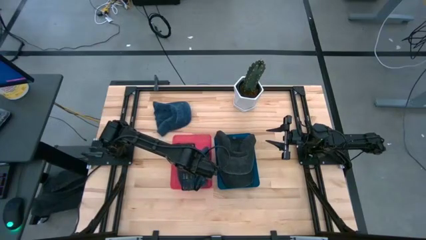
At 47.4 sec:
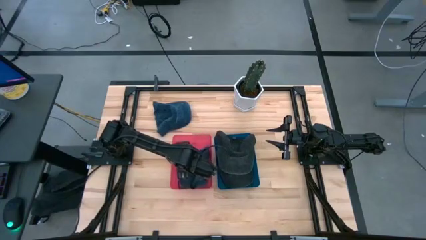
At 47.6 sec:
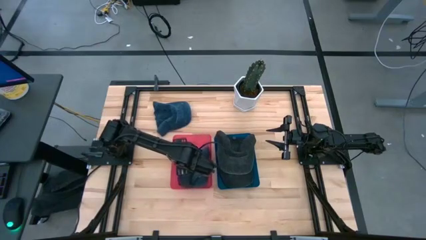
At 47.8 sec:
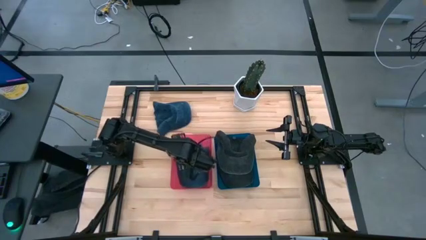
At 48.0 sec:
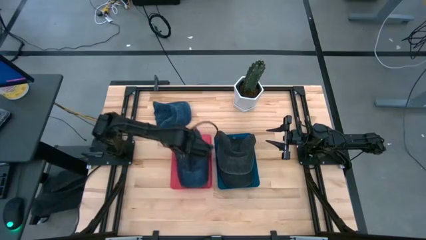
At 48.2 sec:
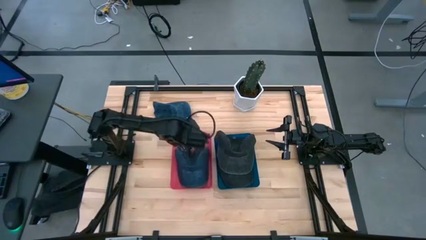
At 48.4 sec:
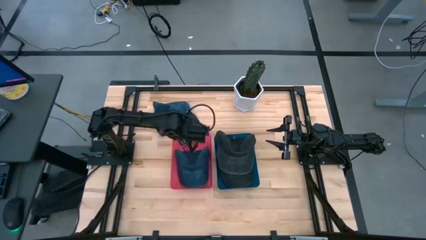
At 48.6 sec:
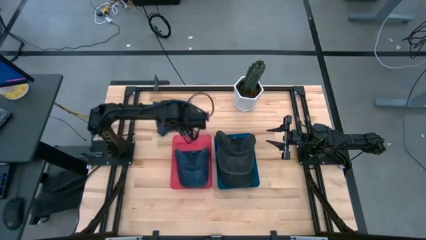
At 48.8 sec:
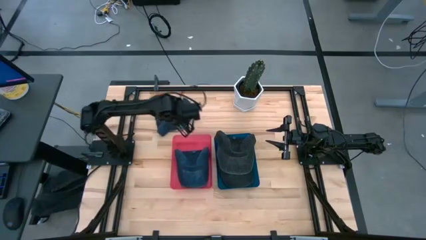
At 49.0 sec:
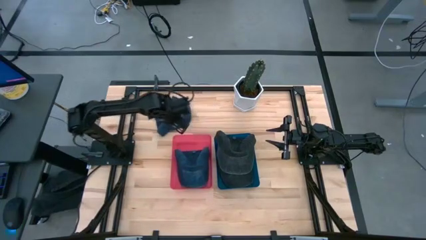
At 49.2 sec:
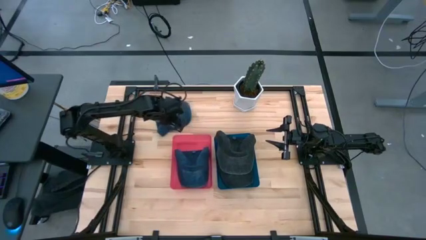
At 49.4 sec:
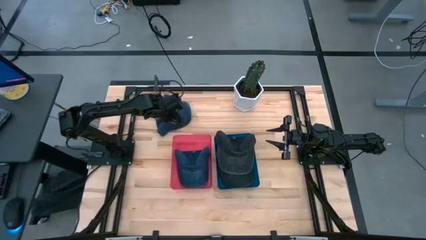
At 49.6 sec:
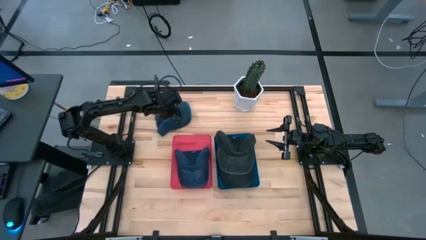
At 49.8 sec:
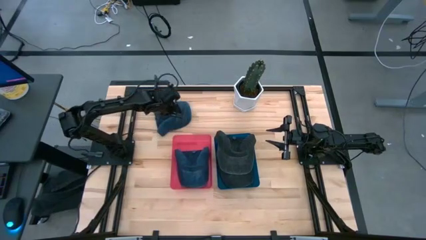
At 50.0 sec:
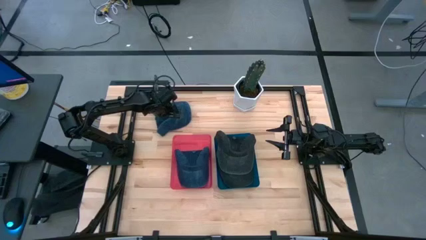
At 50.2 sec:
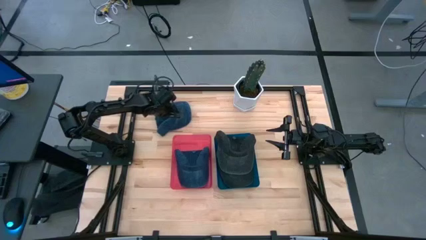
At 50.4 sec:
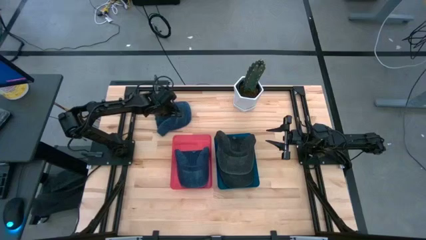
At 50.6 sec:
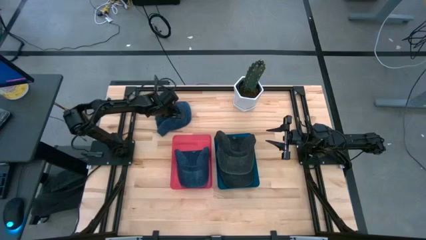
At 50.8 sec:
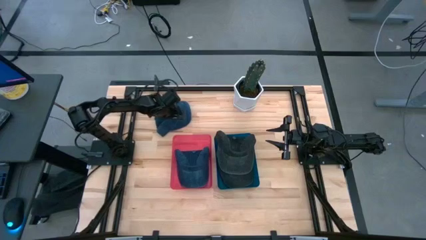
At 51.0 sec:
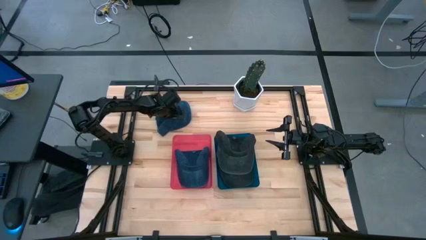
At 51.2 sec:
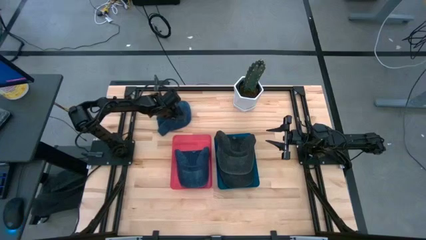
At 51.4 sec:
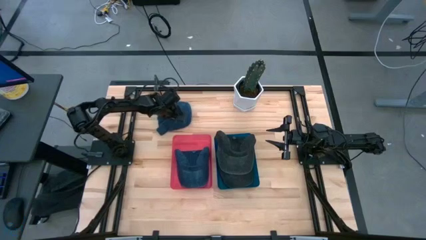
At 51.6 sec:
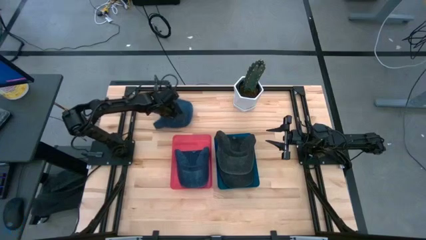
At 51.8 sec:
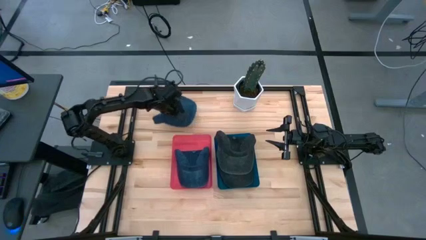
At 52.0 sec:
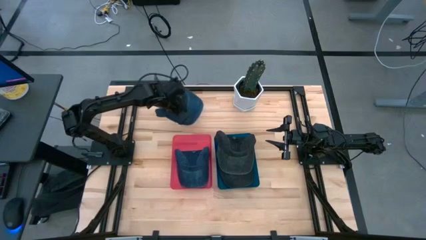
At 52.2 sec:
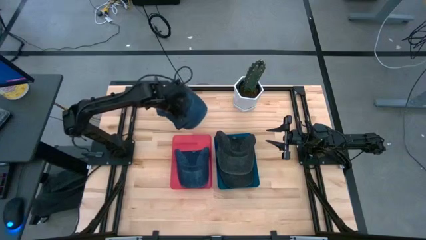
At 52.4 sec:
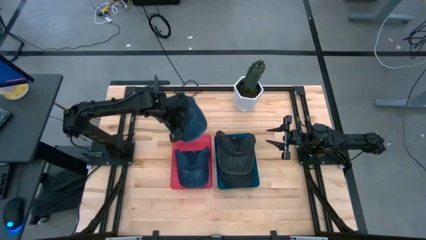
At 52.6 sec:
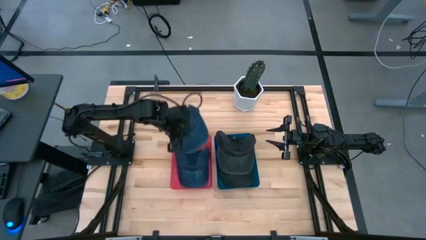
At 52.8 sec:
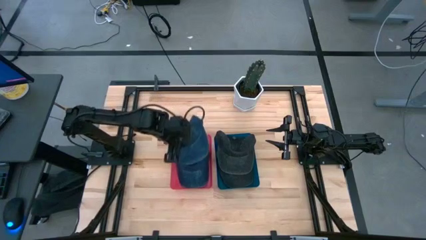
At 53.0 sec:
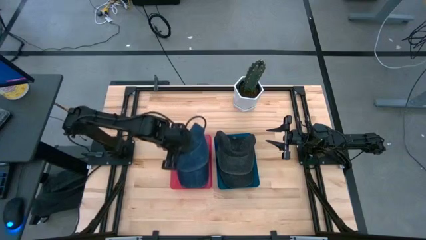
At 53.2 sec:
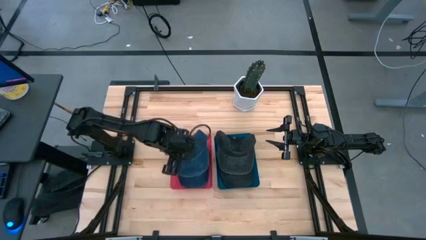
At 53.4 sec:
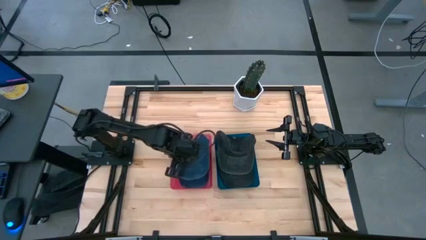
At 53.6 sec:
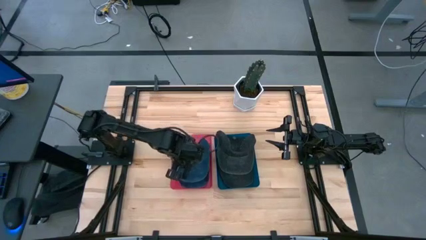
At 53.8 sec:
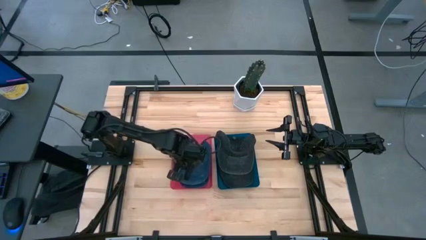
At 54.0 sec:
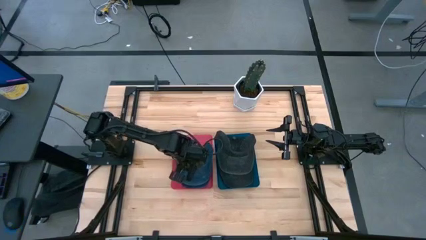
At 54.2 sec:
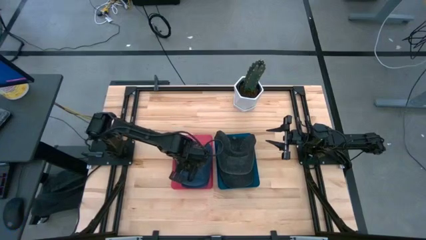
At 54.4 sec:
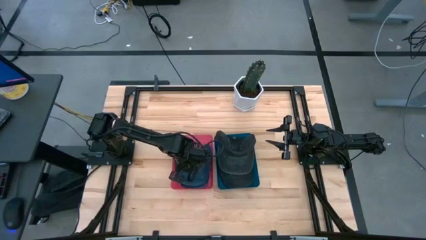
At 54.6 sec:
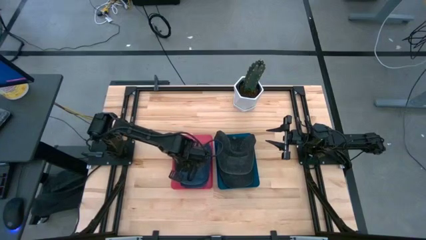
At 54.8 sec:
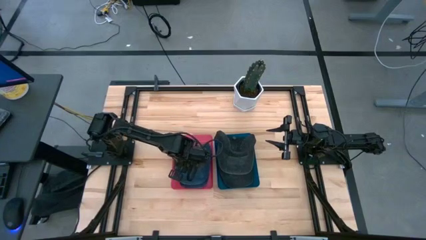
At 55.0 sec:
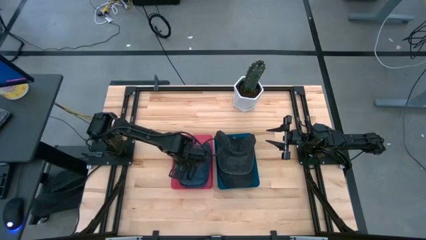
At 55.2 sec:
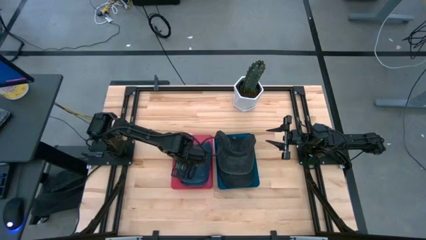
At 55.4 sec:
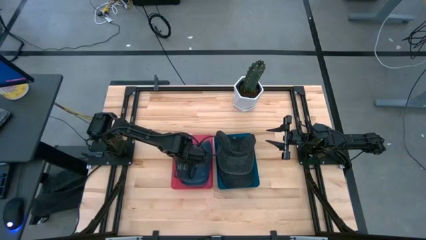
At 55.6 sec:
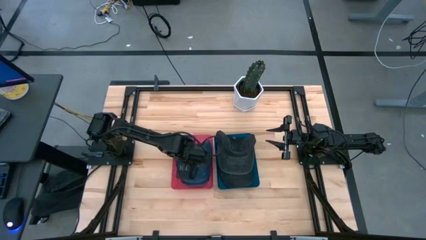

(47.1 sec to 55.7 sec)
Task: Pick & Place hat
Put the blue cap into the red bin

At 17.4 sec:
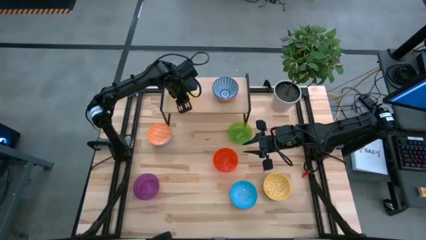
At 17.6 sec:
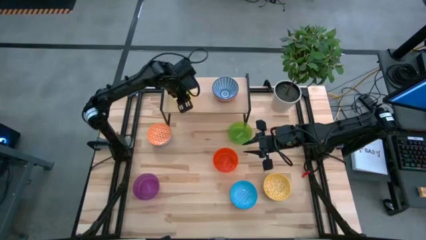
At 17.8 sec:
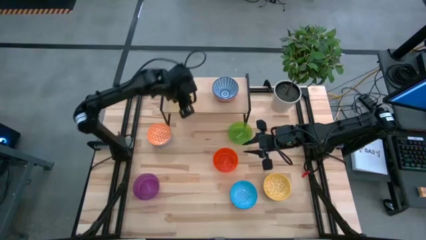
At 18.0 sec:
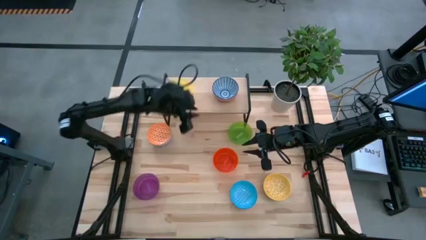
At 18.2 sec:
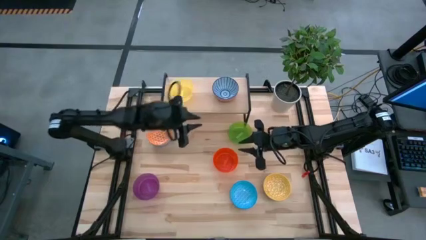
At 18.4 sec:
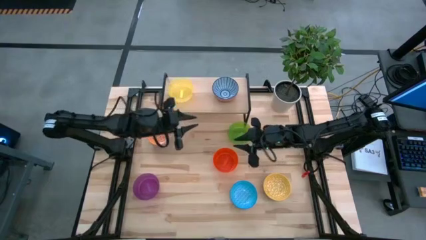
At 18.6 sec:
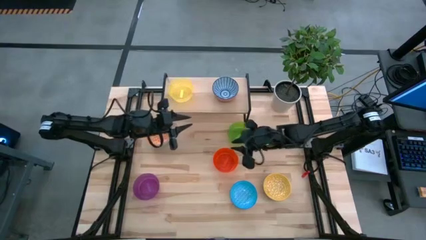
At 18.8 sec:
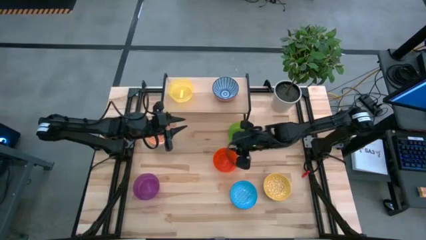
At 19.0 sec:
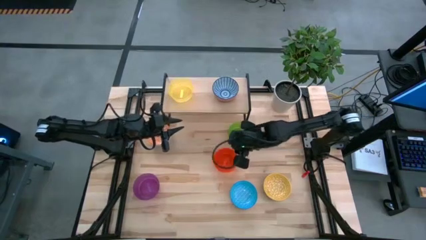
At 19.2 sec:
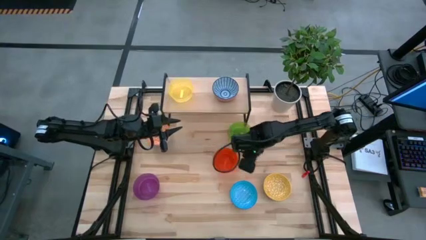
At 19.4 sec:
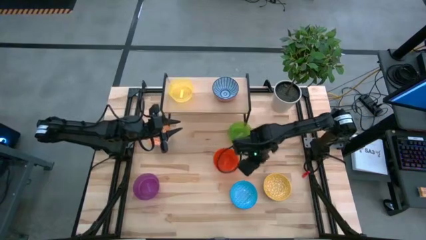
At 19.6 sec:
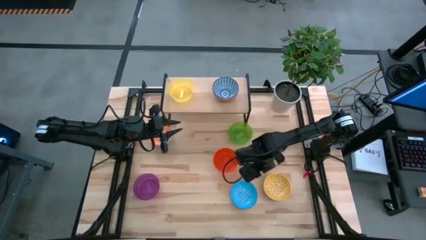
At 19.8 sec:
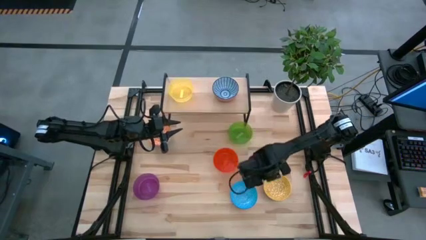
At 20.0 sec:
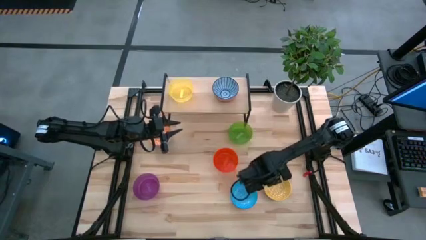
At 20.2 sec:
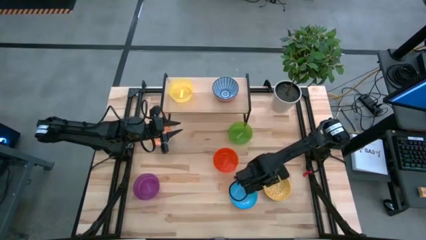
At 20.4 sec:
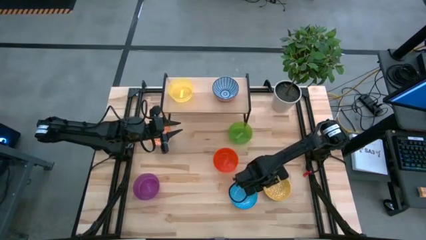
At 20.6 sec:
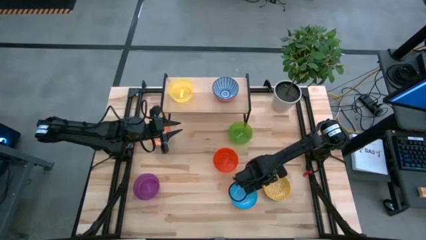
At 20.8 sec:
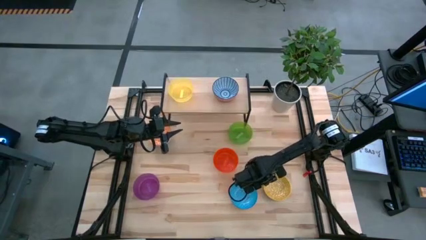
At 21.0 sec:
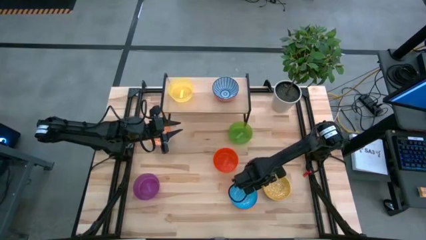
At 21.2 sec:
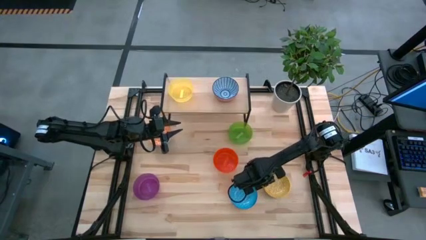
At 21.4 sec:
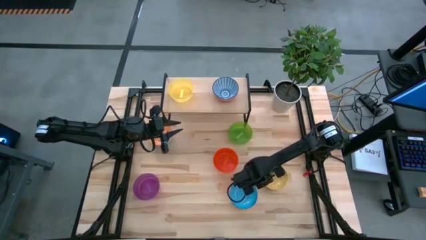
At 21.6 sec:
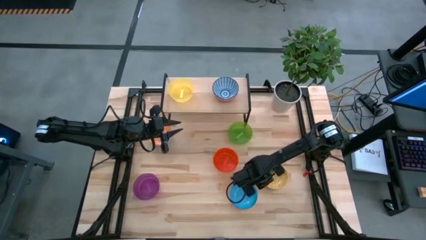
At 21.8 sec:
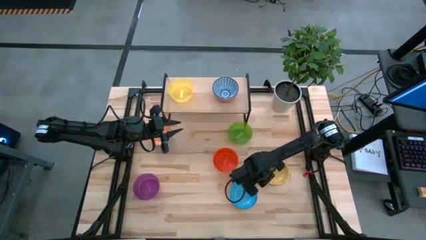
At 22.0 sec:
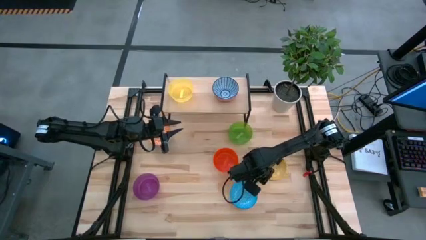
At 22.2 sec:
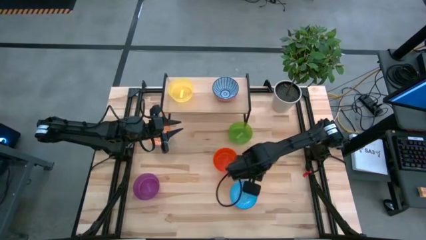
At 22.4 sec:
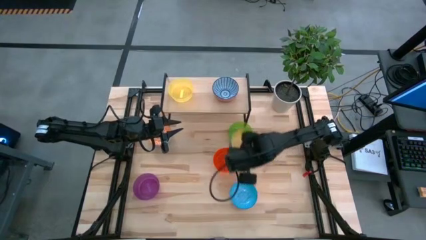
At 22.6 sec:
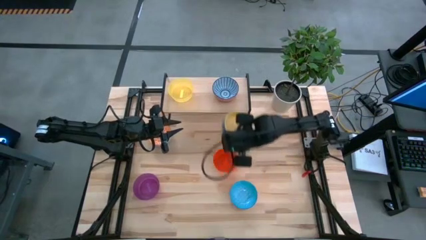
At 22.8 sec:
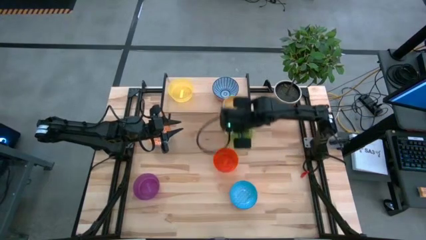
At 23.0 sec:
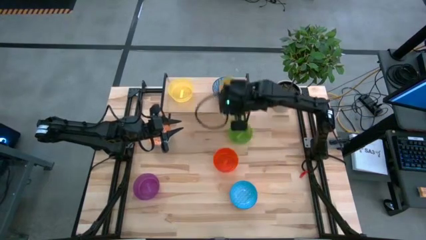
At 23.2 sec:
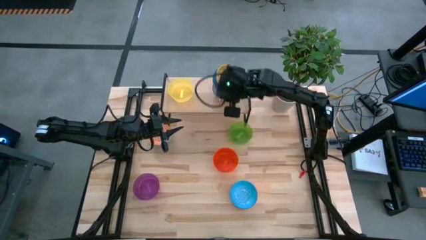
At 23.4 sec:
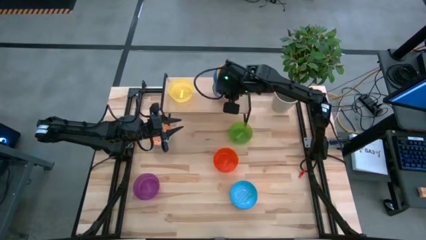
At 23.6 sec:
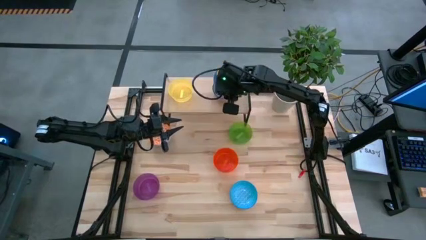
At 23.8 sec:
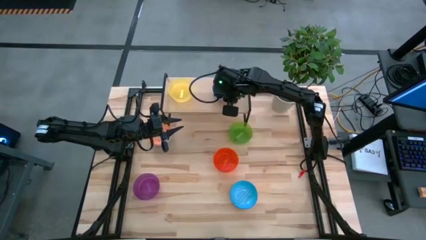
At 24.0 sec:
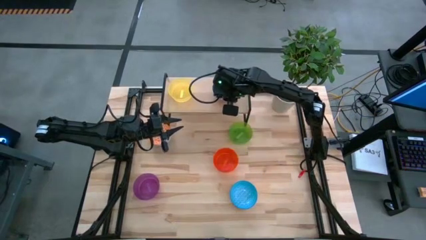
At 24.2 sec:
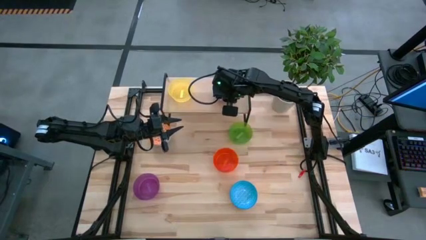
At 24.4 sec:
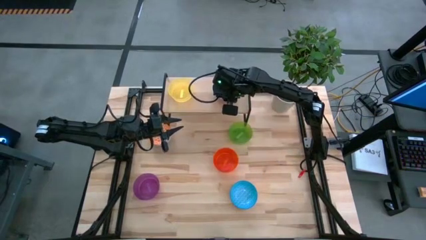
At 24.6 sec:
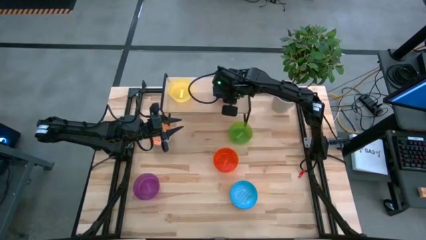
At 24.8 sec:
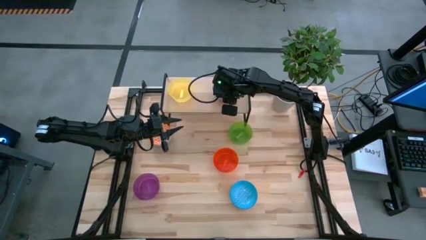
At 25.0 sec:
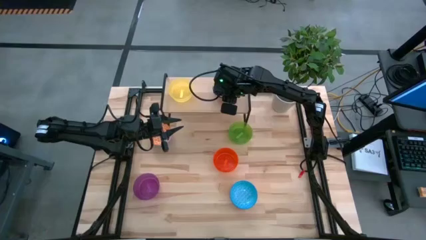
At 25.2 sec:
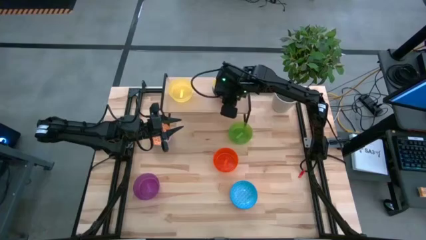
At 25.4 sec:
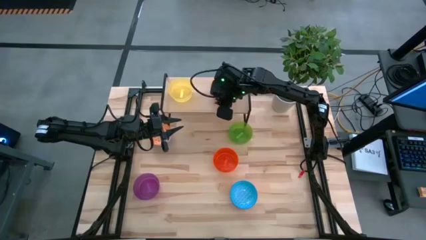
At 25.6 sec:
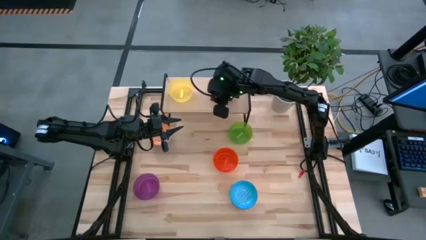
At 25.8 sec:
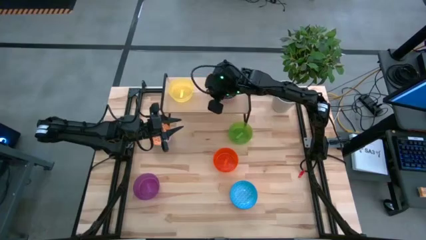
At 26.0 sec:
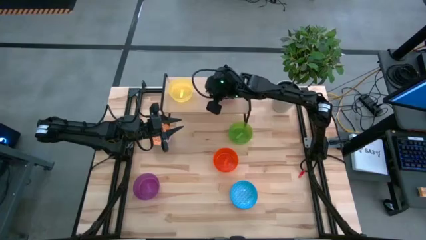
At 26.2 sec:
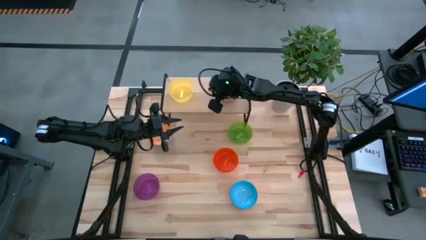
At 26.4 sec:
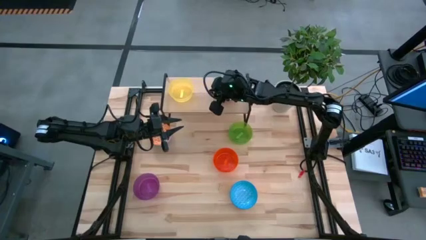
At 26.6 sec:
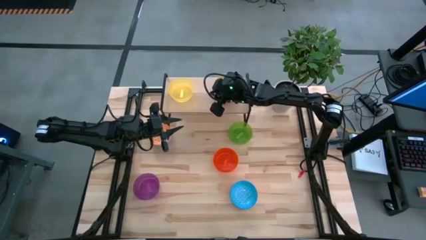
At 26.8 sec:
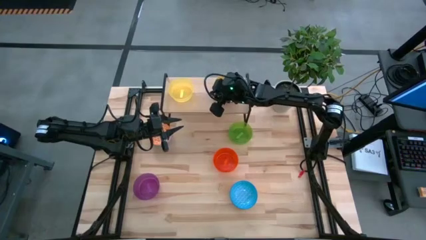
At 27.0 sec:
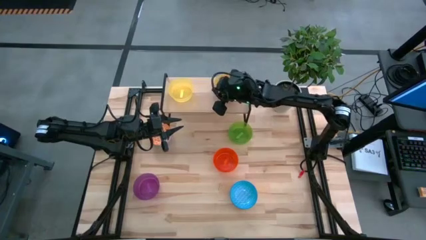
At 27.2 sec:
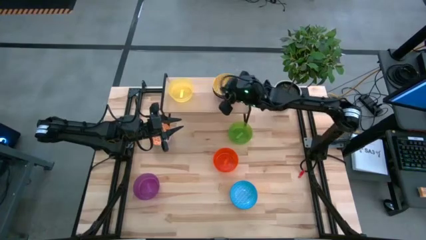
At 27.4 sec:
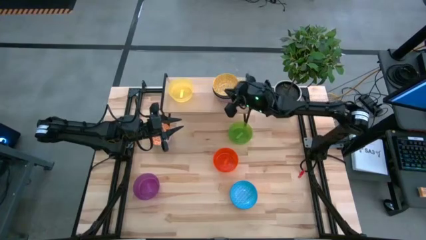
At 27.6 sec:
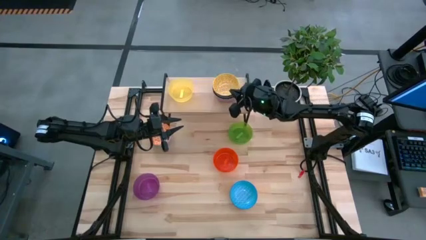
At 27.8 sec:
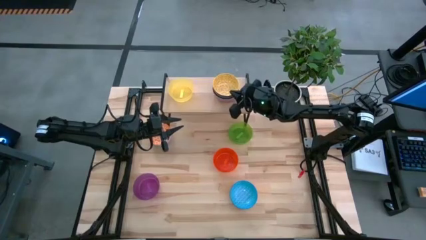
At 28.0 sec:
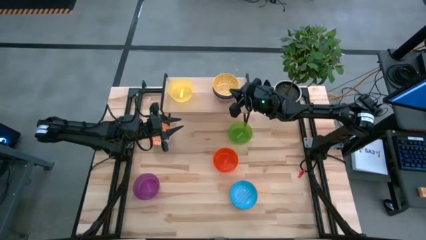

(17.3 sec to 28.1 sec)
Task: Place and stack bowls onto a shelf
Stack the yellow patterned bowl on top of the blue patterned bowl on the shelf
